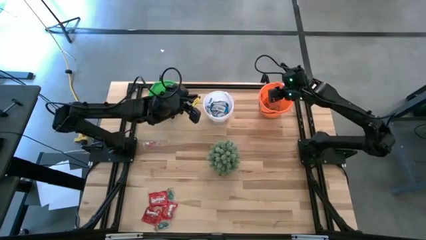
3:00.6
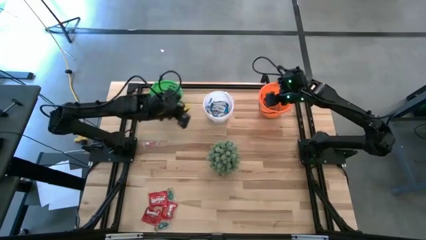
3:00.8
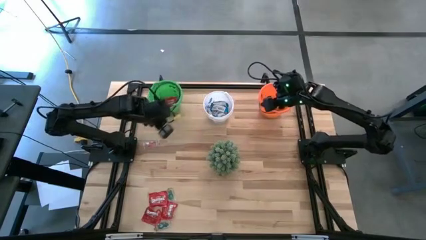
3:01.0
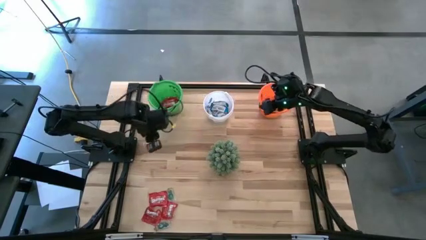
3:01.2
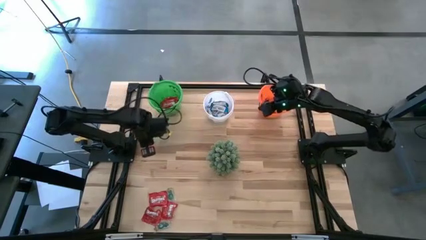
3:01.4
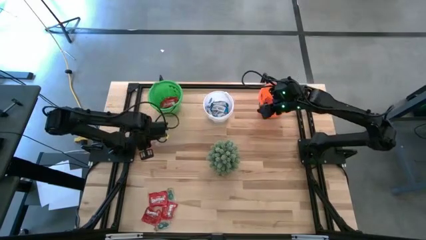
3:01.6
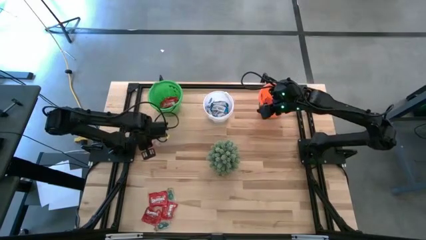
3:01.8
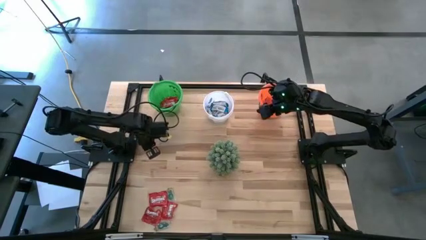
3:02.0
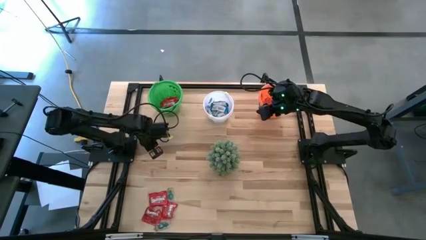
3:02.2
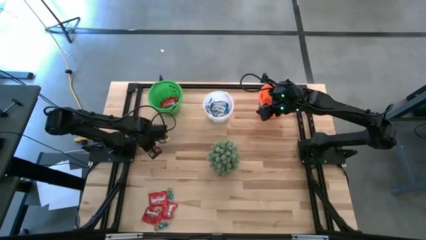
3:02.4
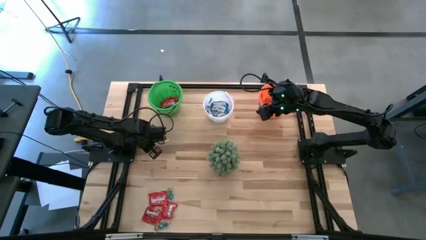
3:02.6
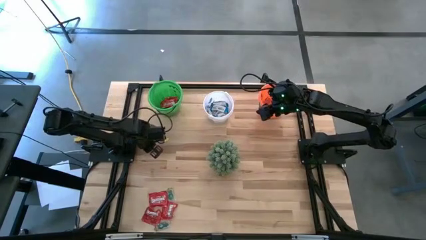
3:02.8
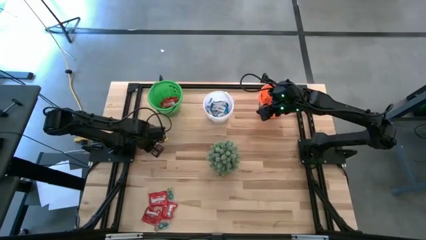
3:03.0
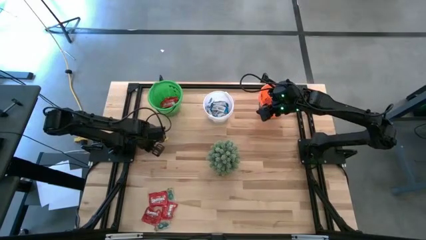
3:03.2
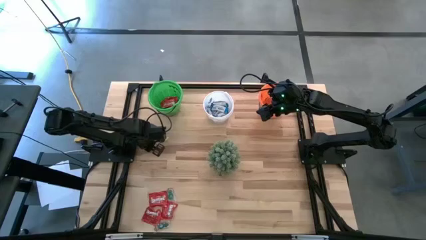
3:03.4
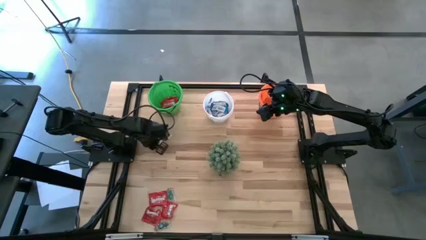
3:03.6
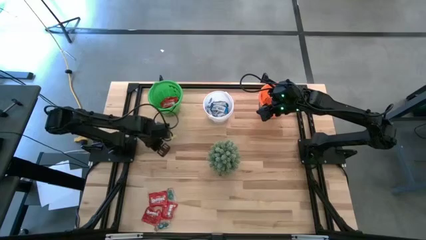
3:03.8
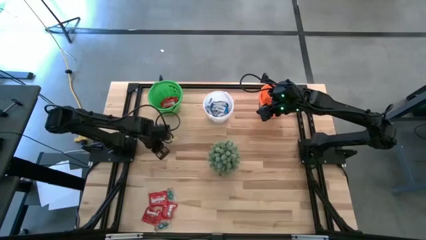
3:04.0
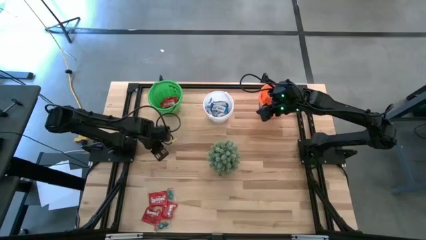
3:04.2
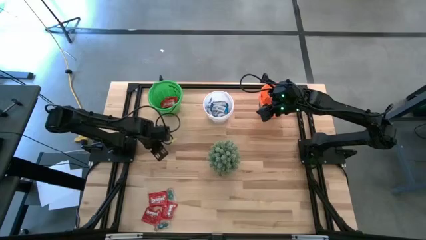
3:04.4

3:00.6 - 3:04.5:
Task: Sort candy
Put the transparent candy into the orange bucket

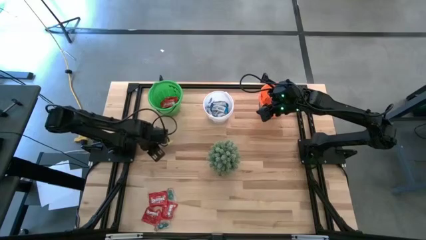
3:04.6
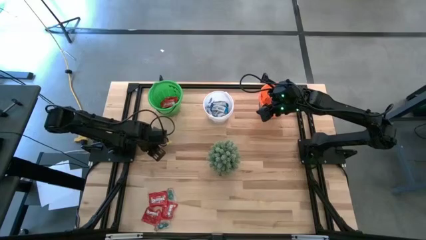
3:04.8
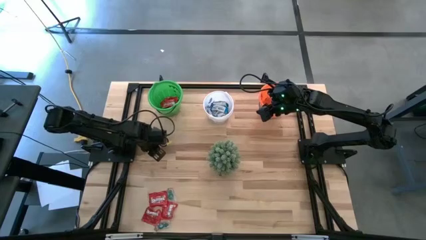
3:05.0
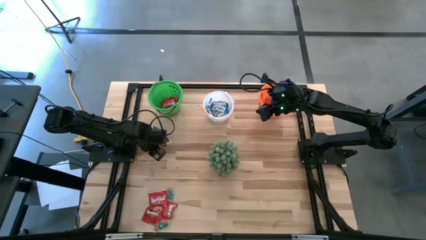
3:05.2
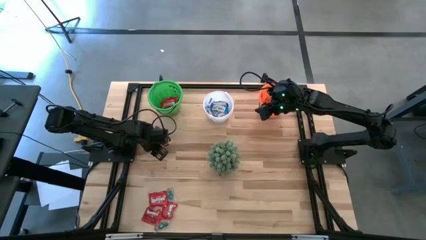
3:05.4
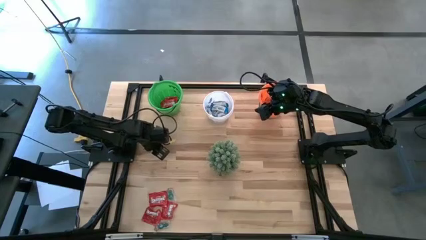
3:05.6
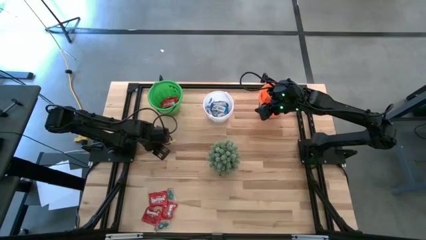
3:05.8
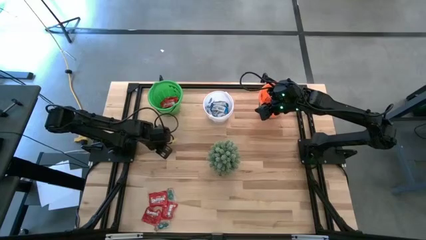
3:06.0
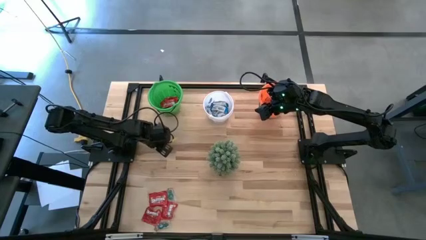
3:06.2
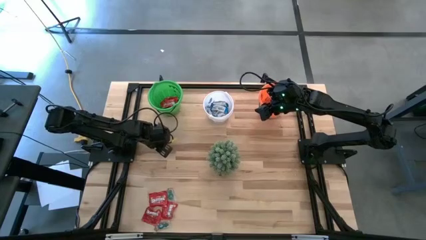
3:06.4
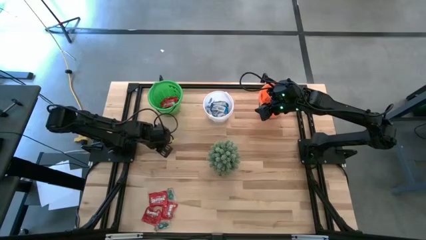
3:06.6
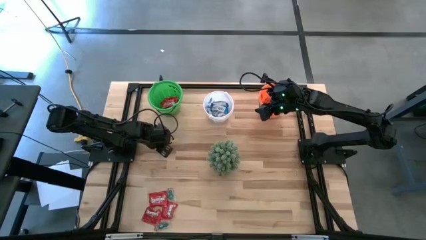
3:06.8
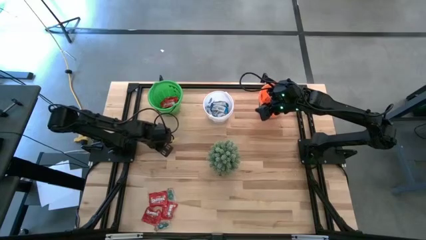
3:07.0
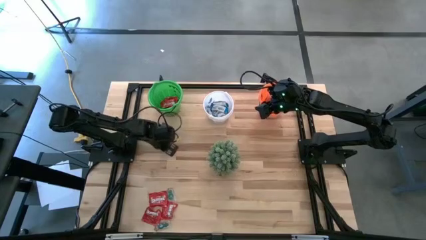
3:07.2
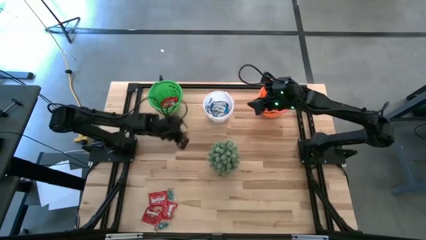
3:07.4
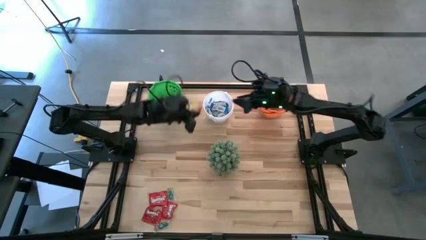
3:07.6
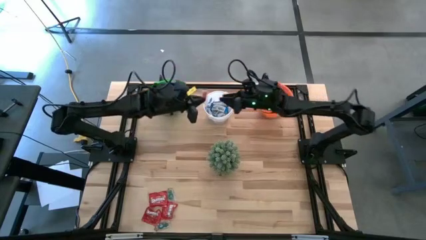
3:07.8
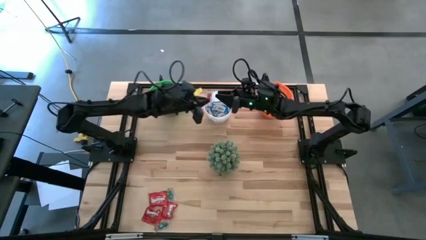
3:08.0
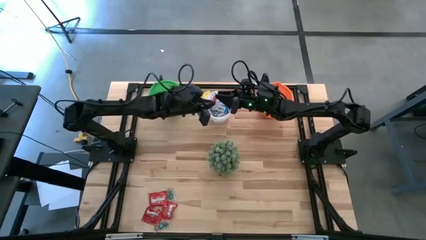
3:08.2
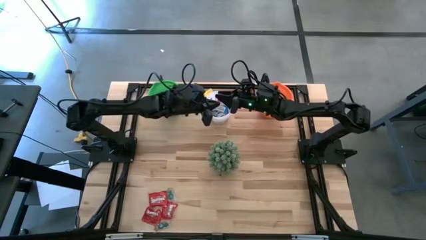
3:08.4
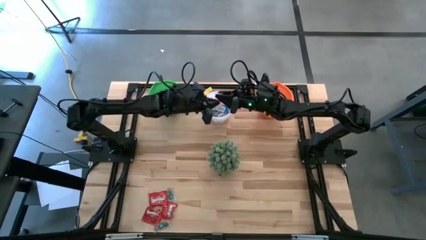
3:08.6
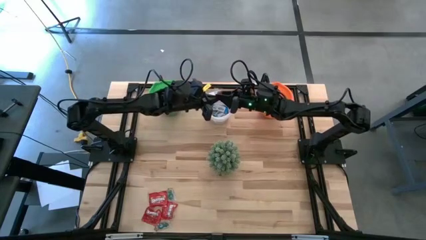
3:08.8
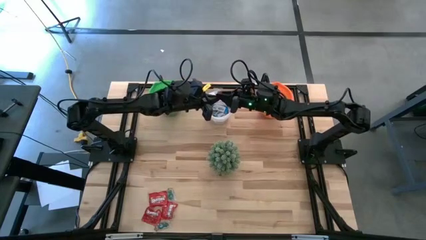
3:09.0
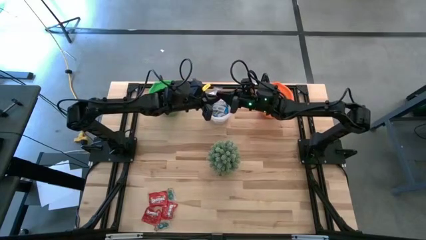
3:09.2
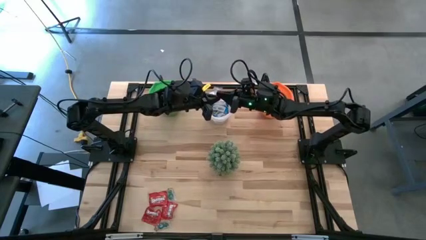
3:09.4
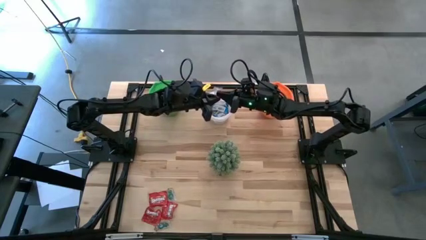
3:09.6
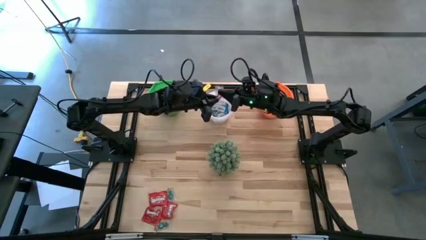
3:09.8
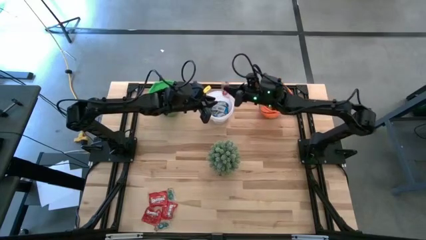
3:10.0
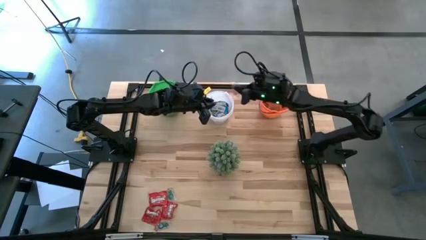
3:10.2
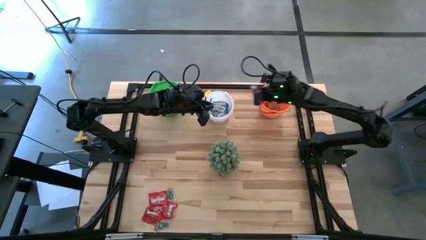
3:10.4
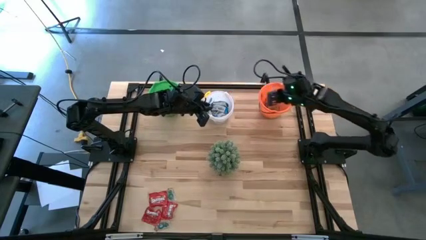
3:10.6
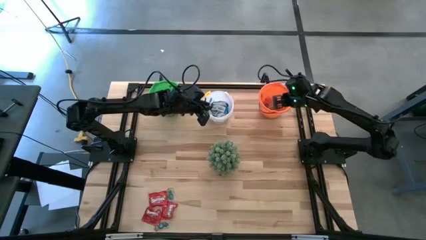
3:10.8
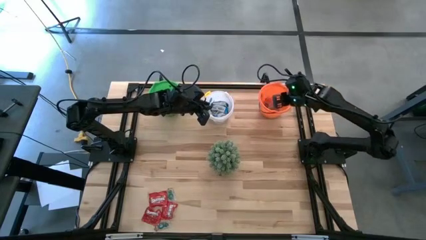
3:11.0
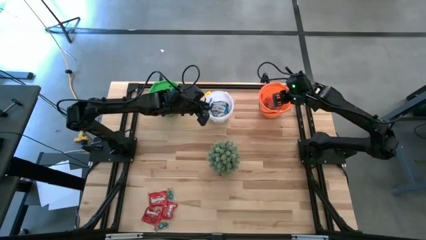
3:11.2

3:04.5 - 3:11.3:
Put the transparent candy into the orange bucket
